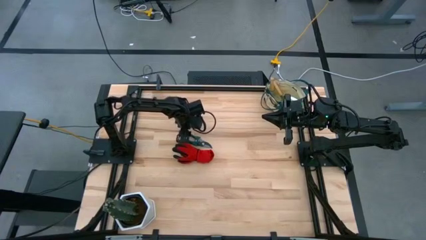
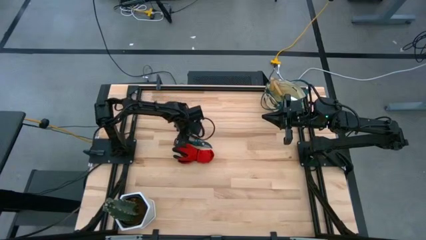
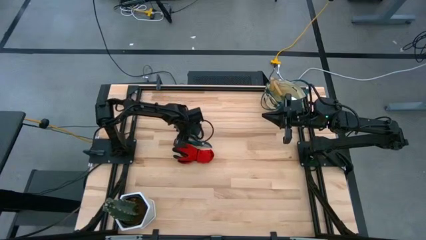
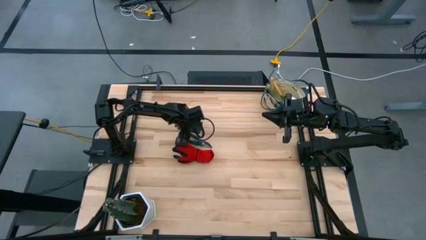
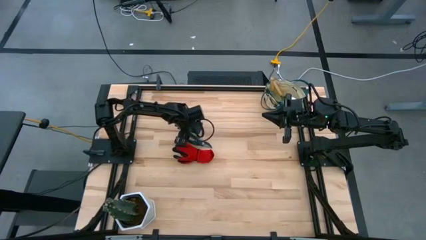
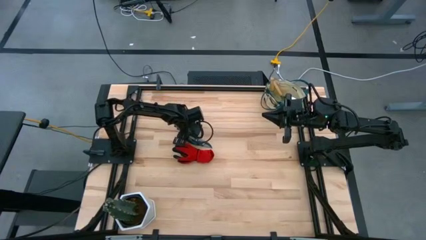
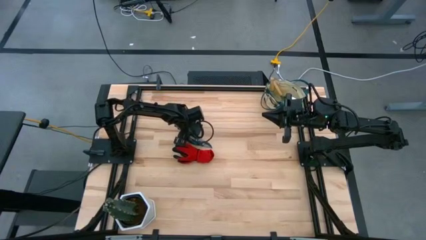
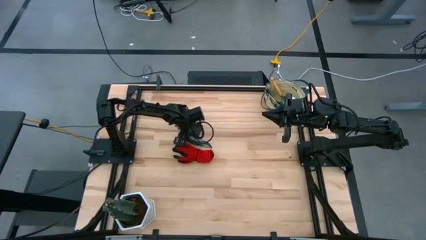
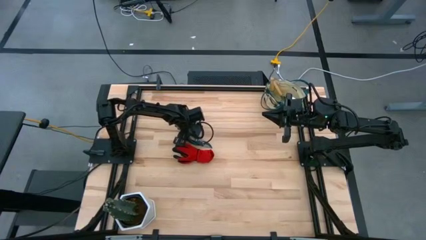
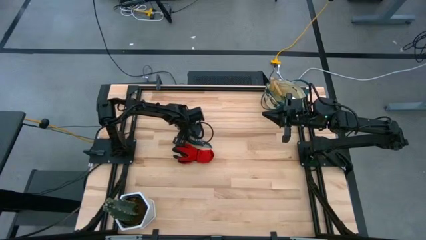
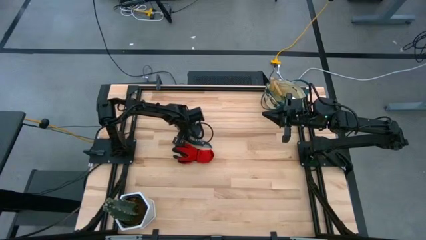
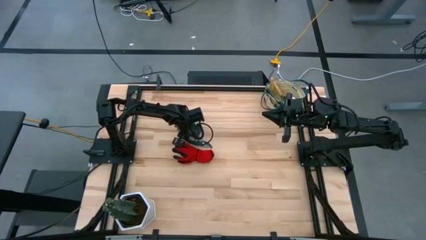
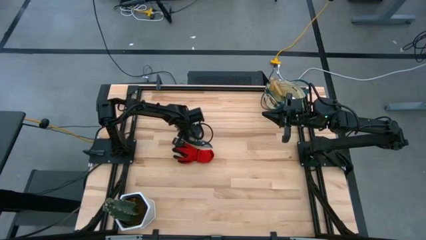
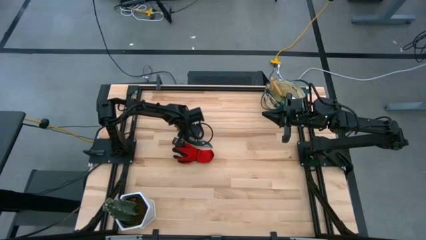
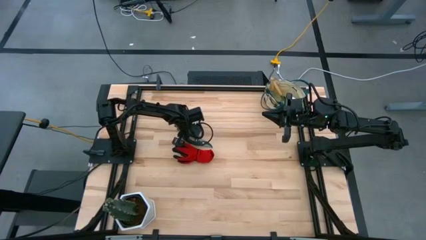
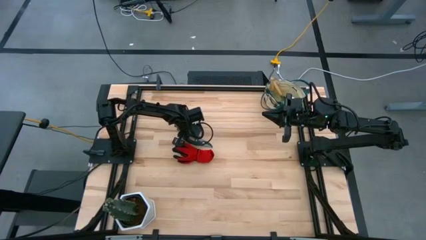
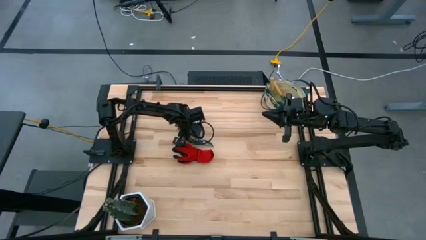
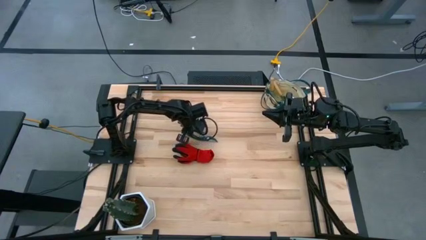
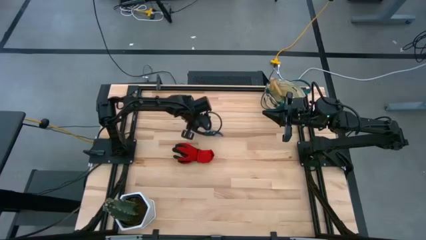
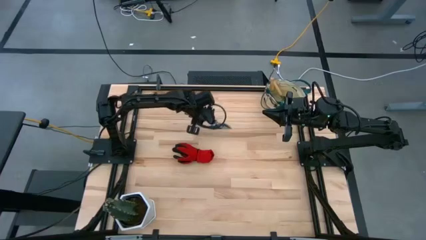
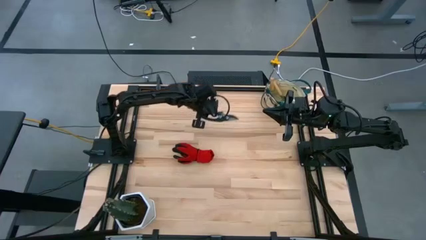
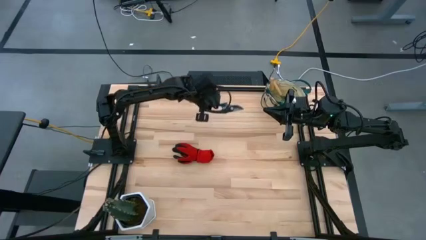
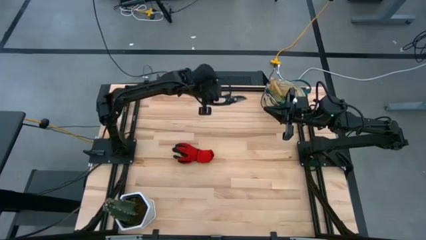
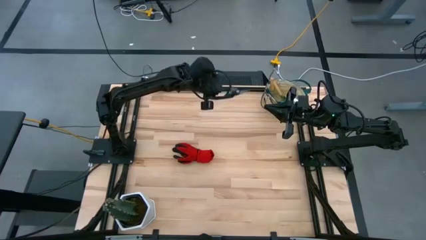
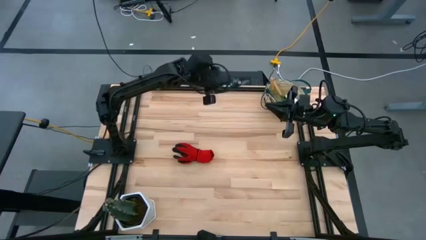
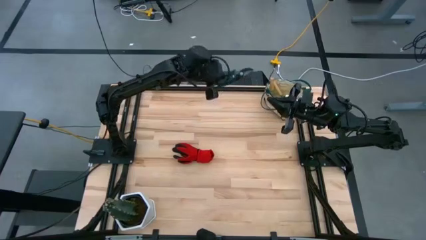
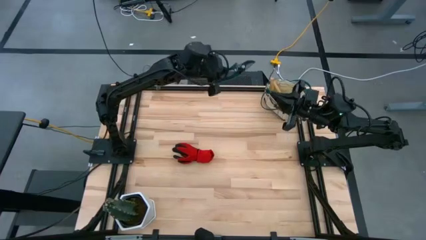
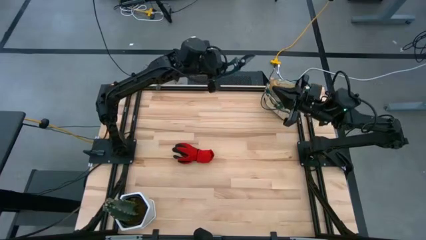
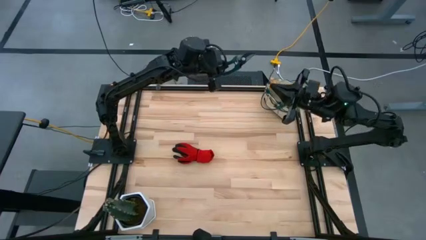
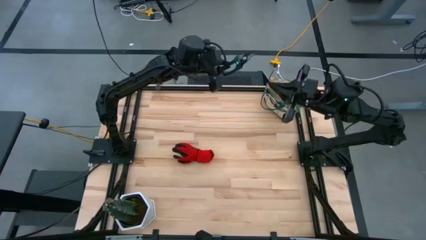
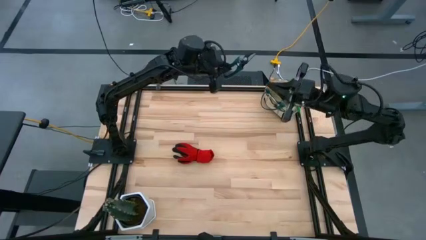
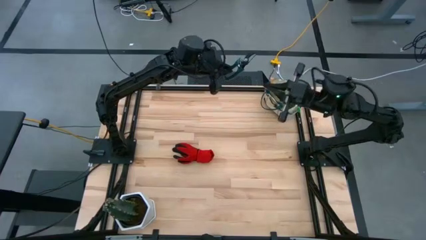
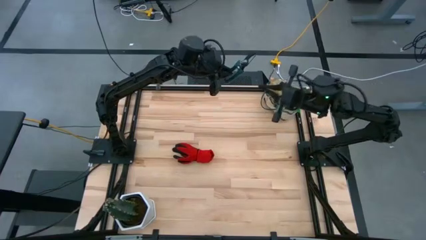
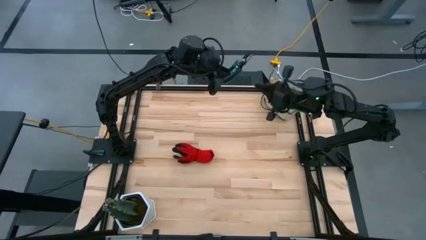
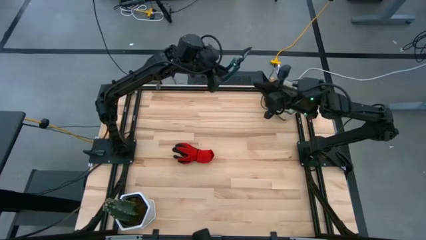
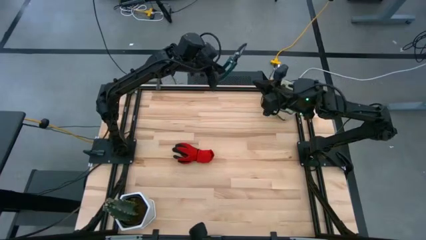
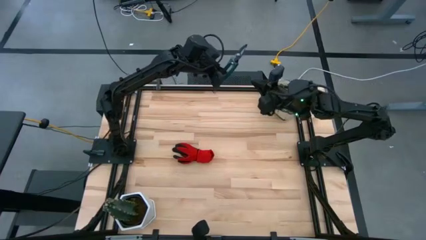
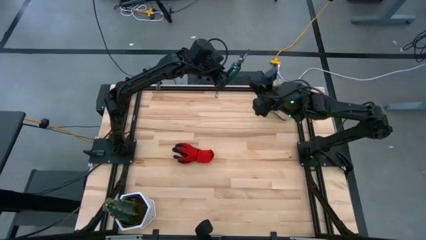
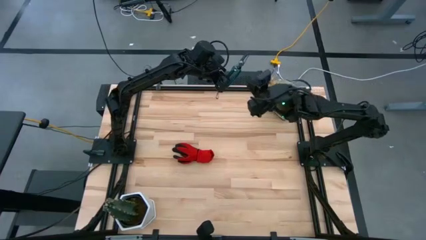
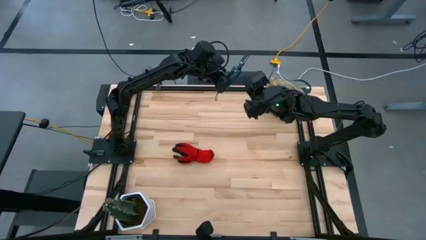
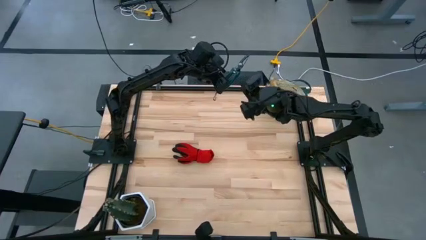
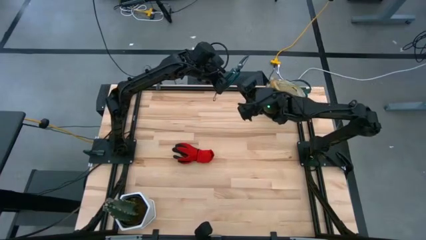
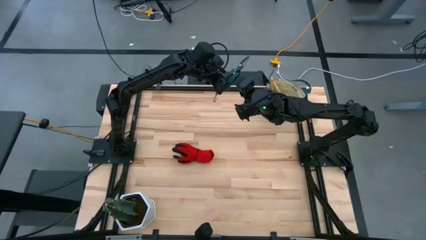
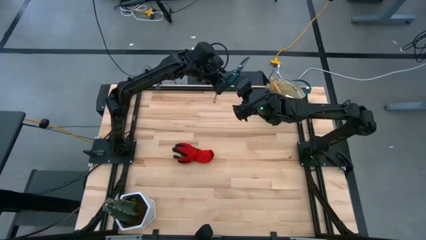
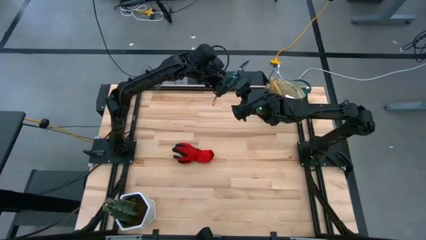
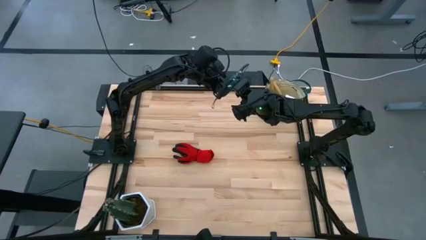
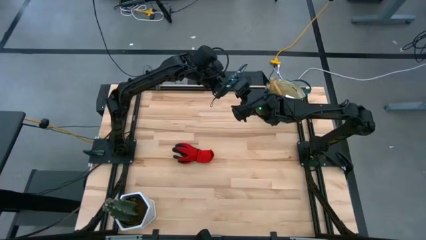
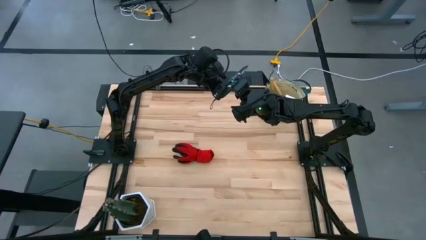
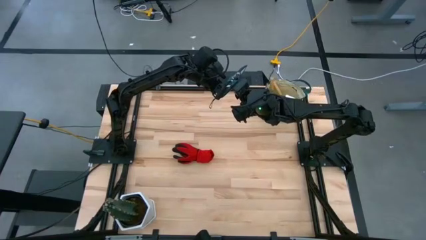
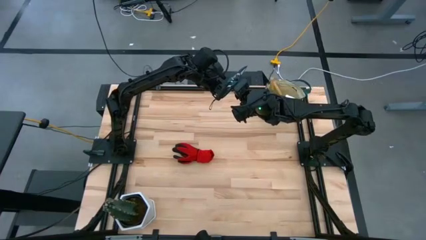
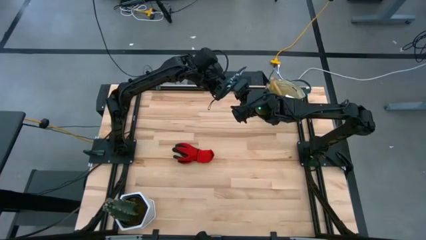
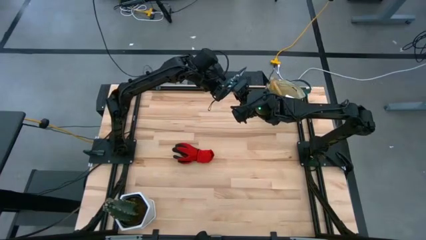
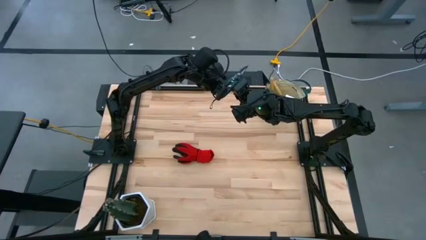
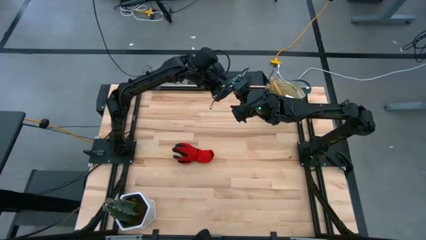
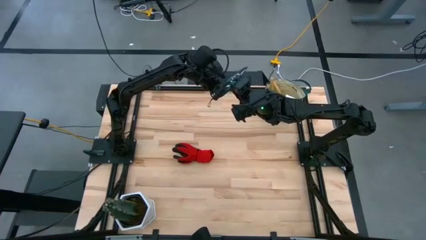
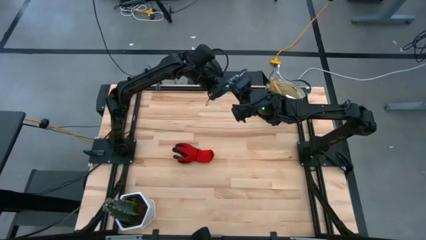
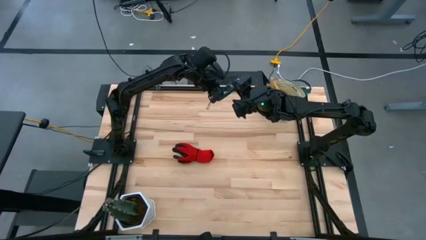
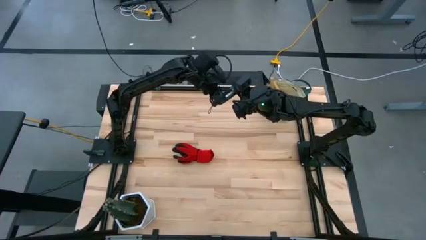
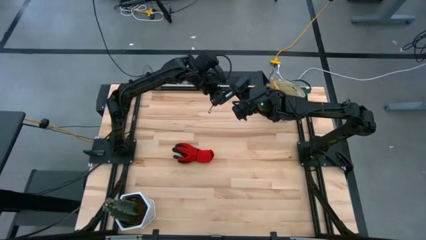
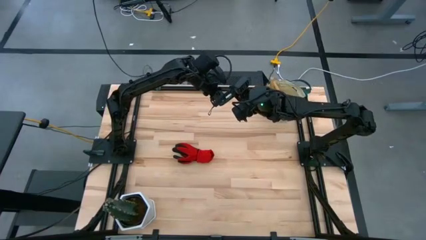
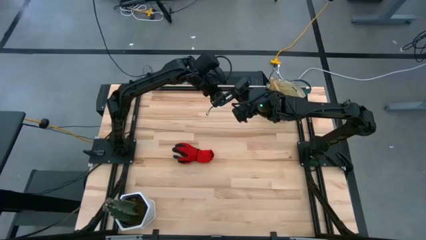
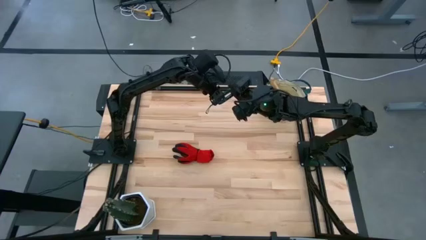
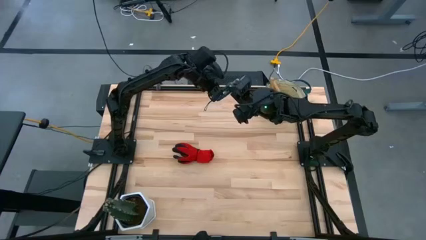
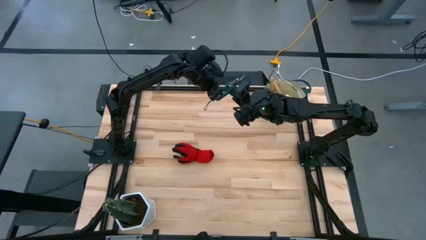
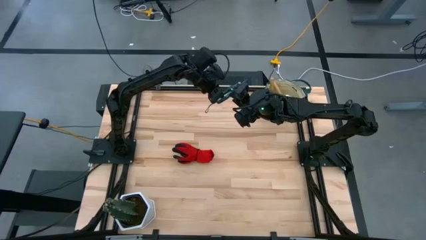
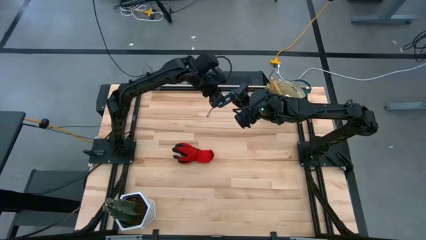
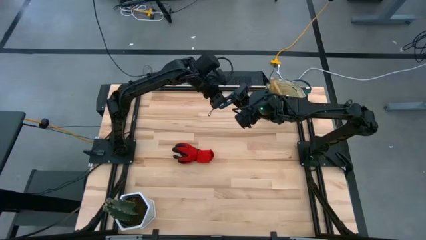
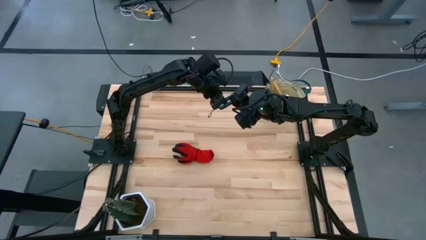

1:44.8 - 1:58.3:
Task: Pick & Place Garden tools in Gardening bag
Put the green shear scissors into the gardening bag
